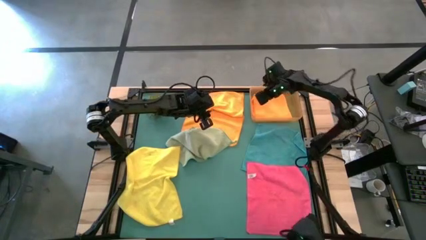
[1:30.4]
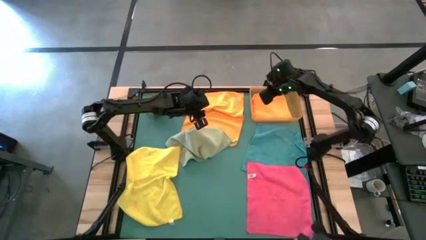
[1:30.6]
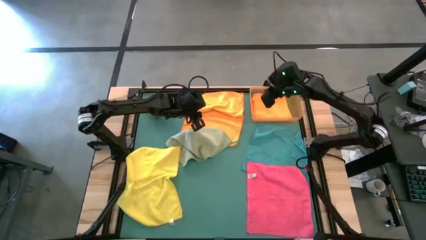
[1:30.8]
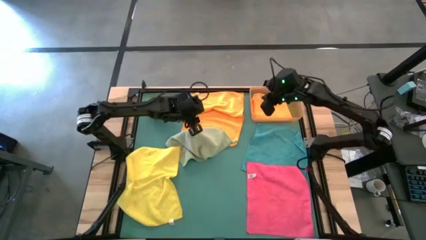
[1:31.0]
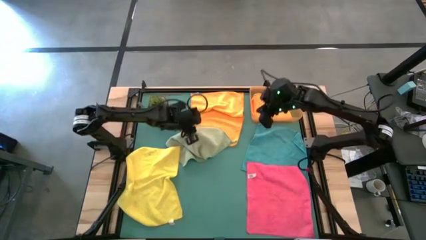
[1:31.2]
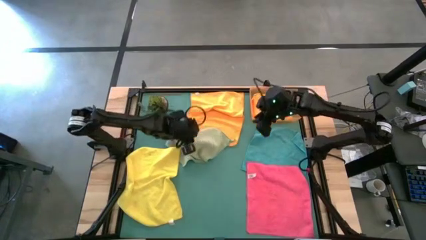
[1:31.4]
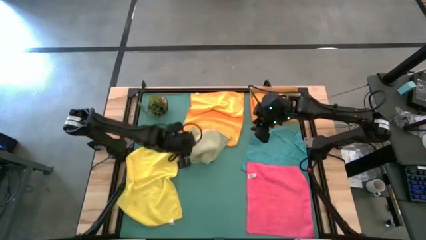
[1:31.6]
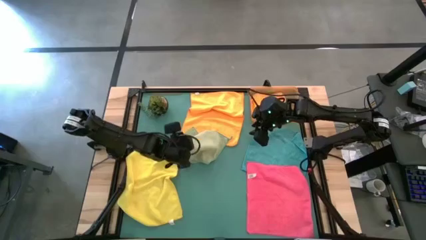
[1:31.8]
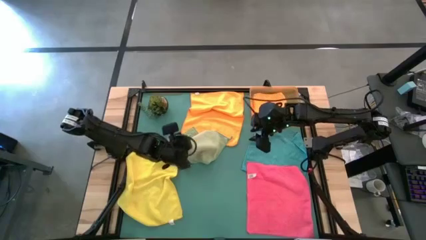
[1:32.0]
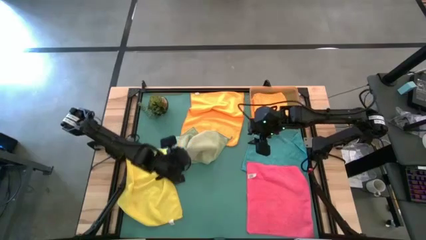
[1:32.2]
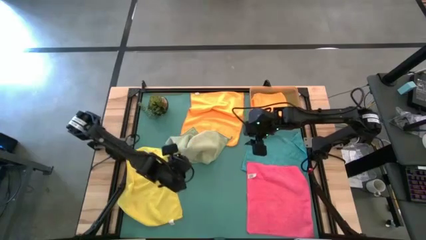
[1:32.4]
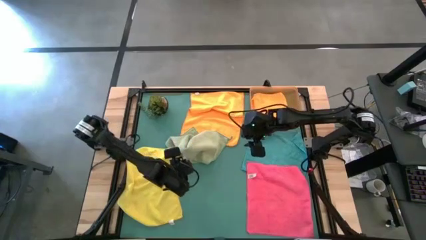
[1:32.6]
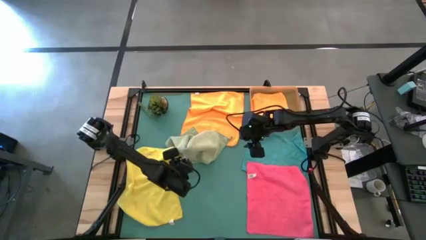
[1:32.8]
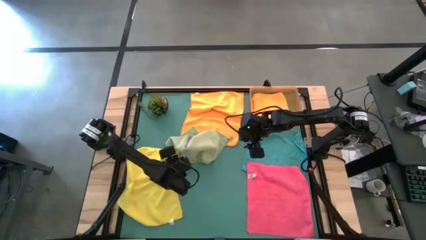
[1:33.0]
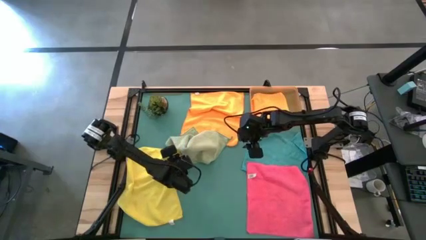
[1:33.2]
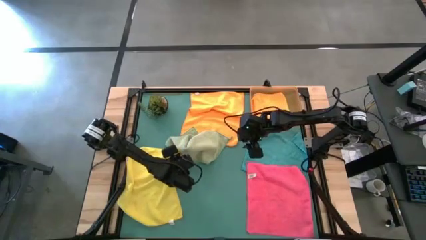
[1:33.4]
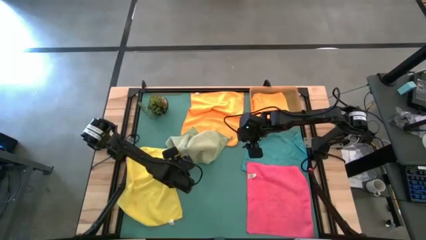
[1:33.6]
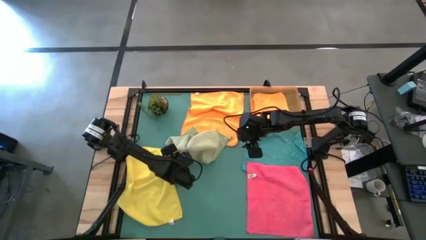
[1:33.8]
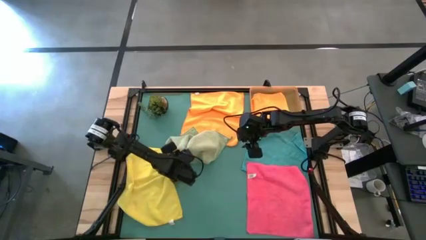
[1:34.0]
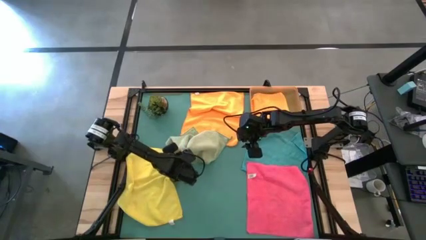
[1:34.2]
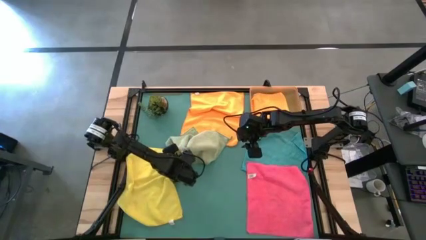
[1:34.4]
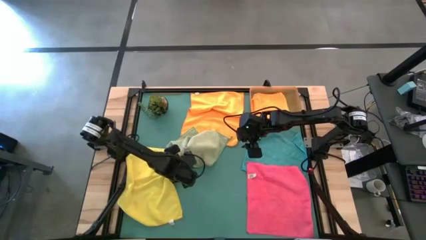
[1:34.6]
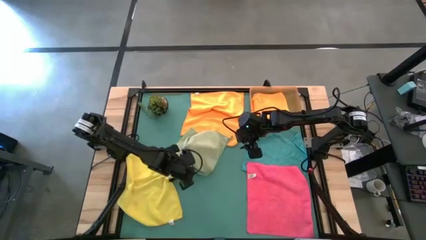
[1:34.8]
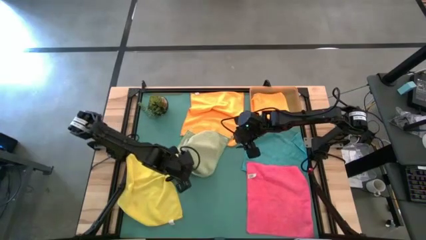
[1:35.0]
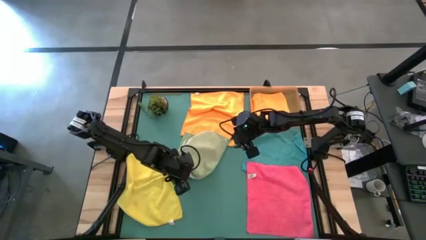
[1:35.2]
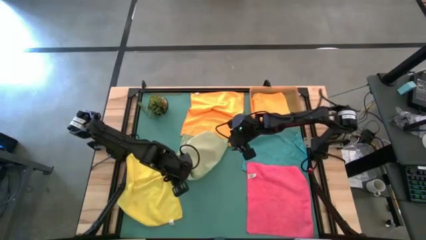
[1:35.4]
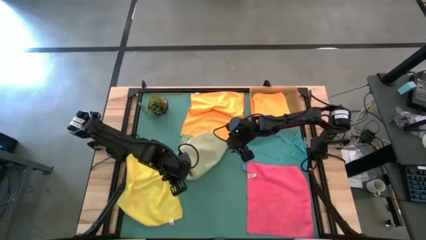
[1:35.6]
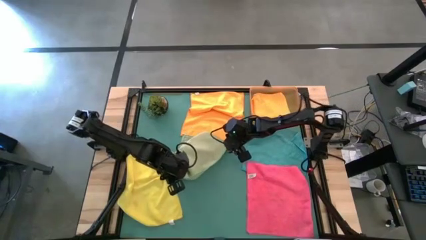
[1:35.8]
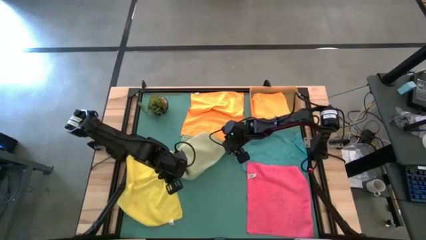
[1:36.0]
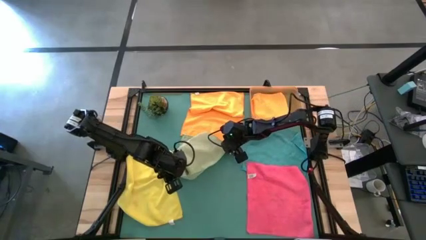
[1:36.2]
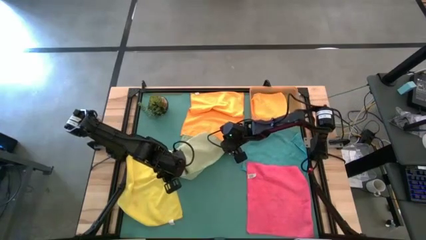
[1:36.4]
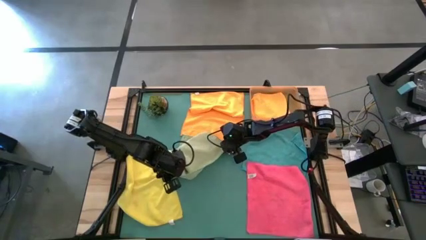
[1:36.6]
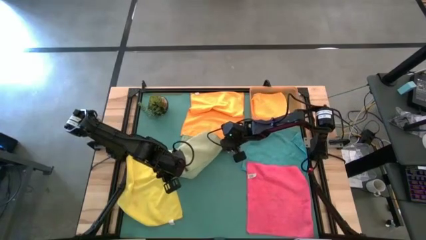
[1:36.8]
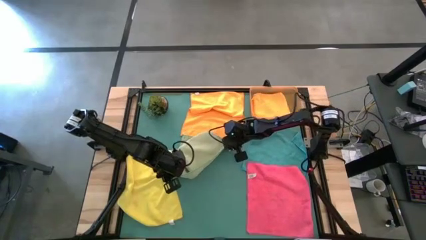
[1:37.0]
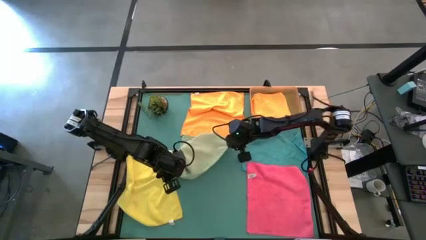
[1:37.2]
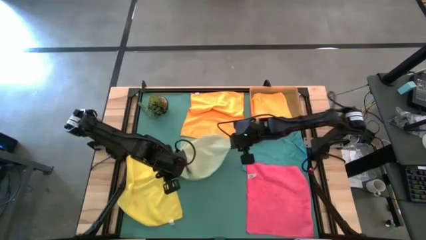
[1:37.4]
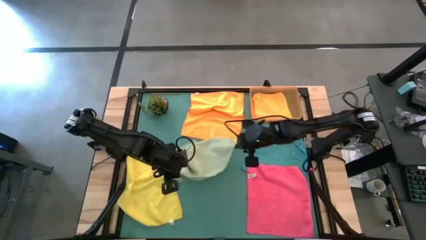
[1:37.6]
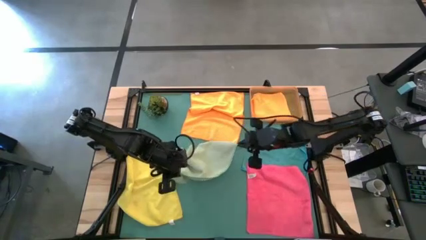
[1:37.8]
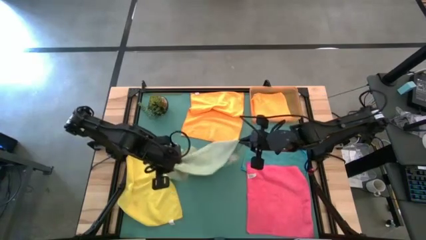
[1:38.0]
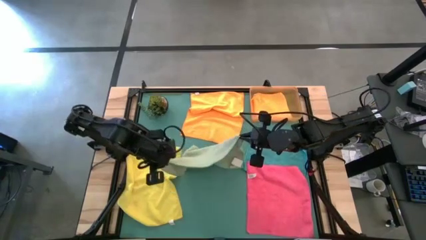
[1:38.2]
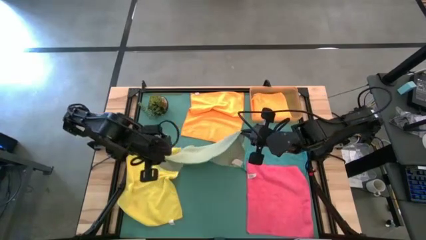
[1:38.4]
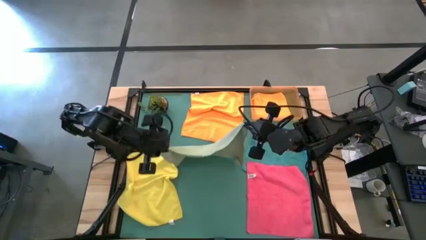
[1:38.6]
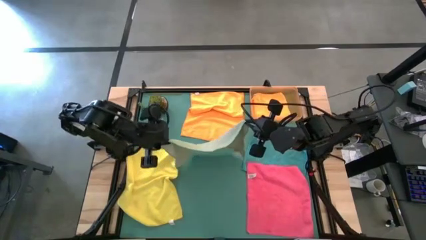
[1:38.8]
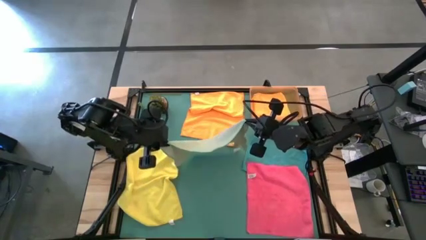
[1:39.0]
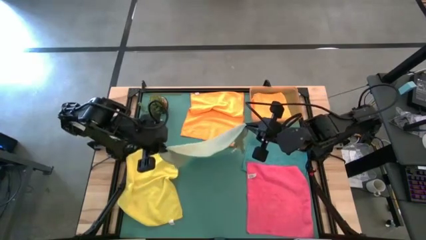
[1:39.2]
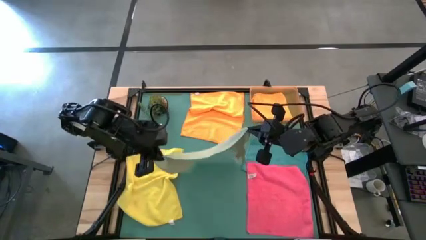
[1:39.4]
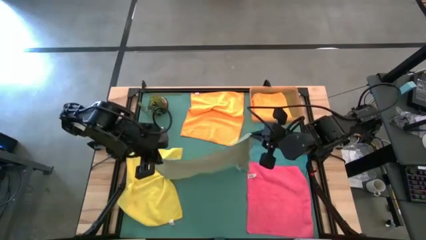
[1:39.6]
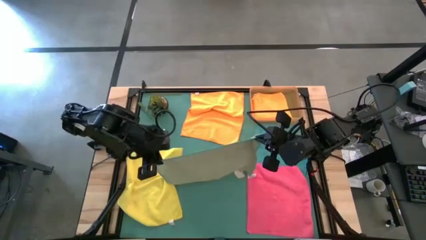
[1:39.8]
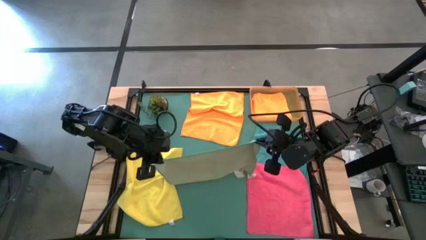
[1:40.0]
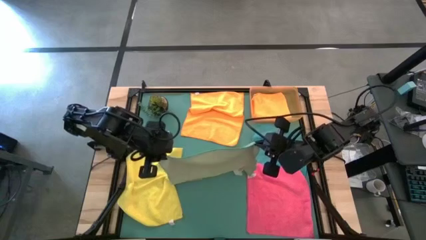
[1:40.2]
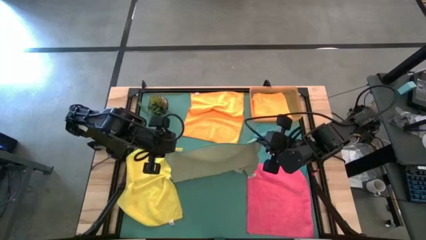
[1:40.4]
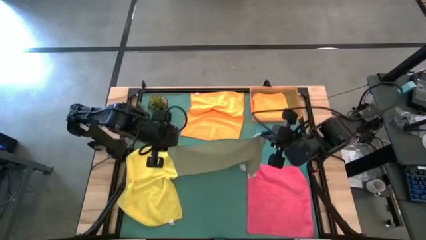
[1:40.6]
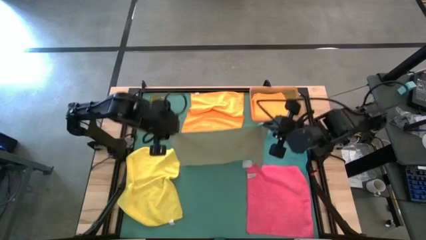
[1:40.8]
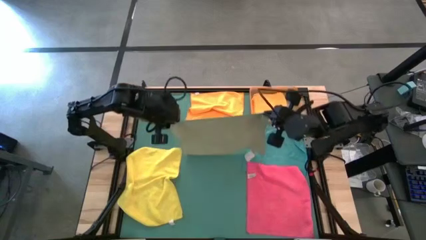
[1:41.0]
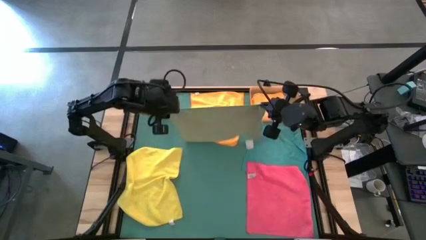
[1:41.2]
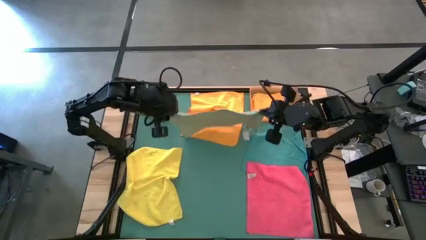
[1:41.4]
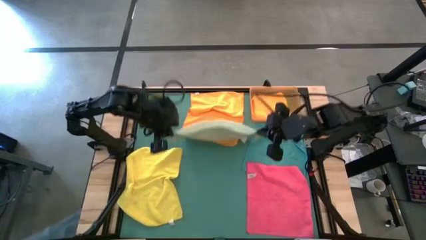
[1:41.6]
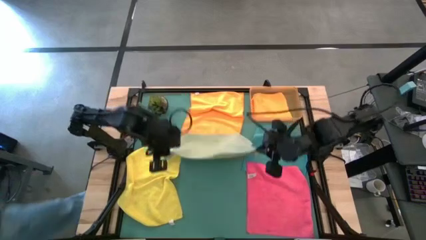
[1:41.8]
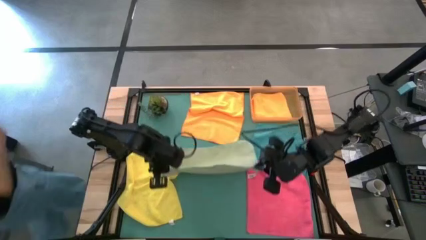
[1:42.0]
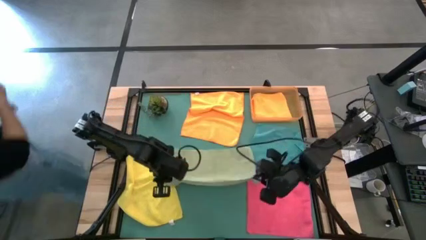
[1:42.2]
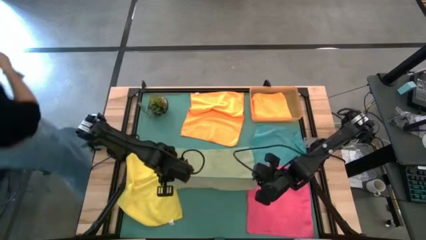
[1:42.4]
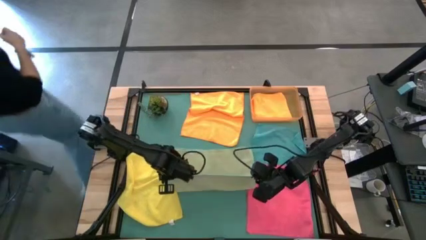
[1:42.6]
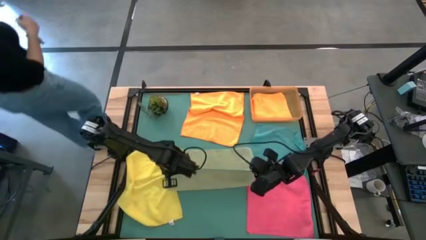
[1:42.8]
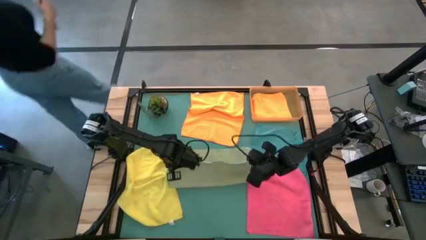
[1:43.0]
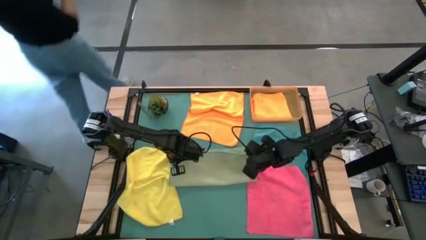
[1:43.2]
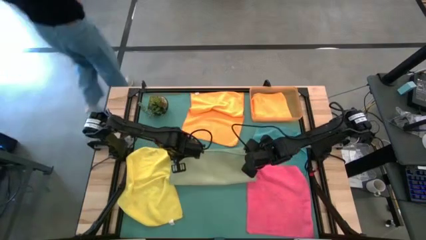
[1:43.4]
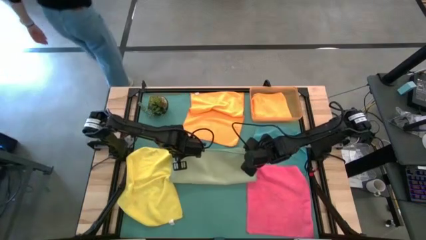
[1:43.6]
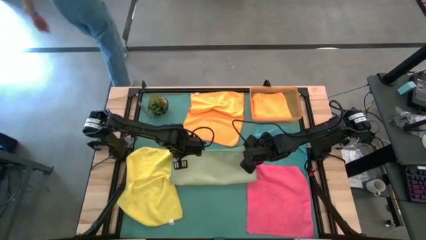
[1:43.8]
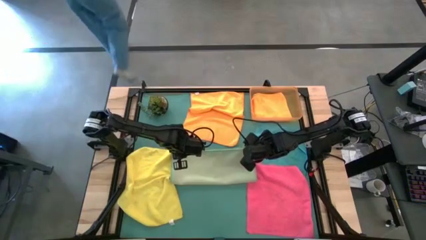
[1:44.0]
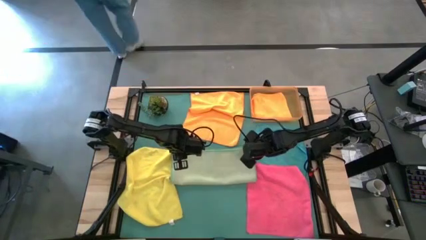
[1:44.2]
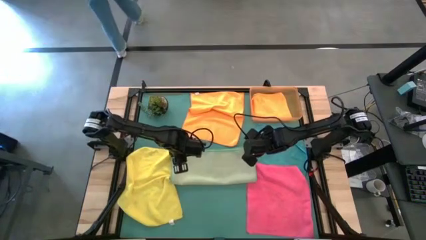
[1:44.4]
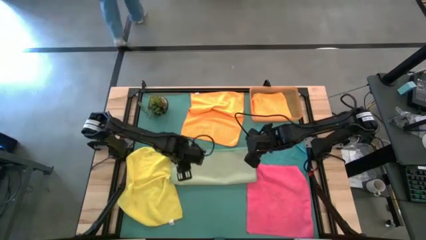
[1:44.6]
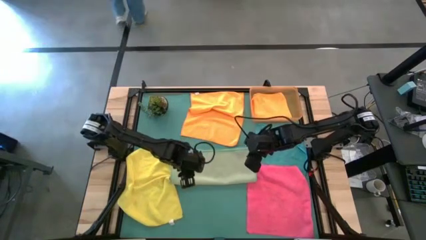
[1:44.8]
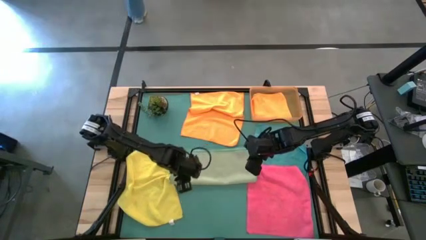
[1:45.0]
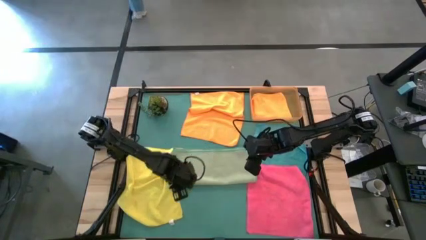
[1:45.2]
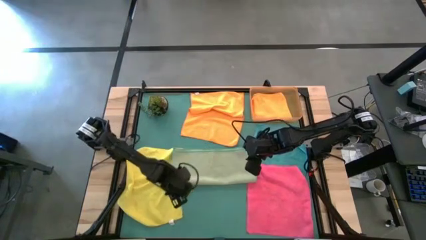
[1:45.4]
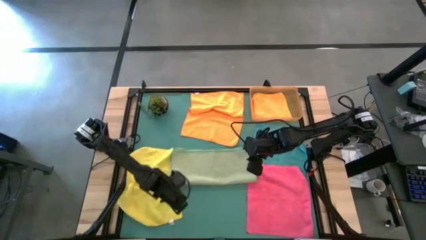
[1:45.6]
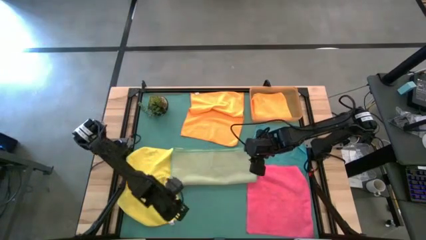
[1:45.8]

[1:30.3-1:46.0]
Task: Fold microfiber towels
Fold the light green microfiber towel
